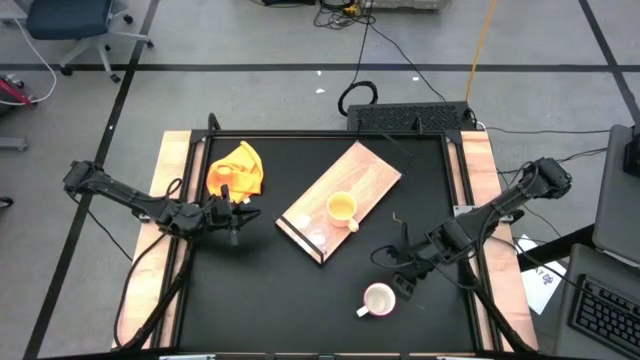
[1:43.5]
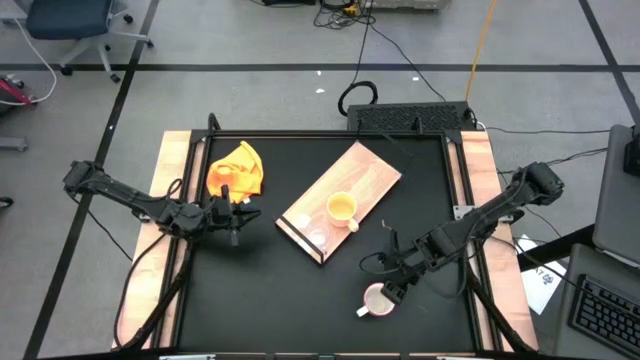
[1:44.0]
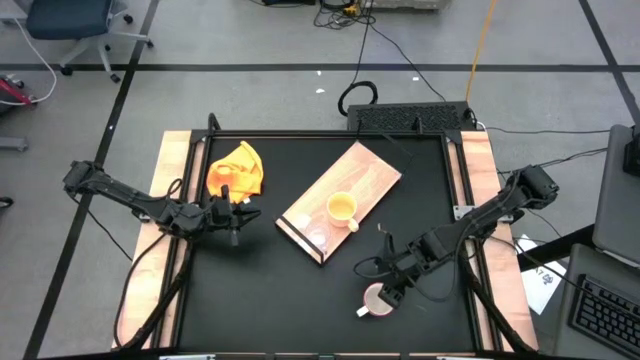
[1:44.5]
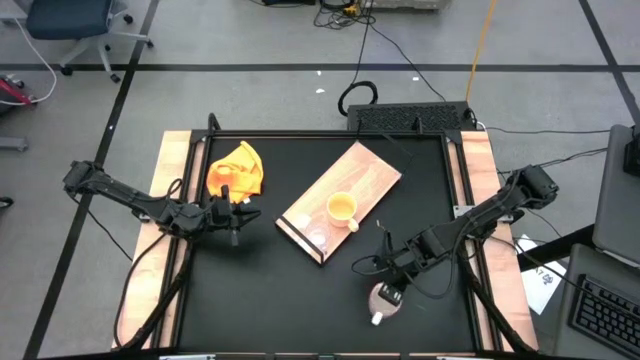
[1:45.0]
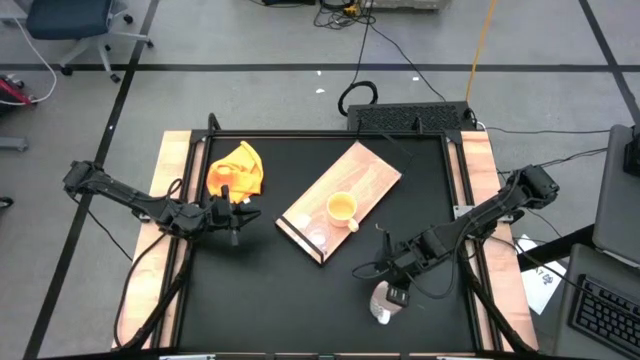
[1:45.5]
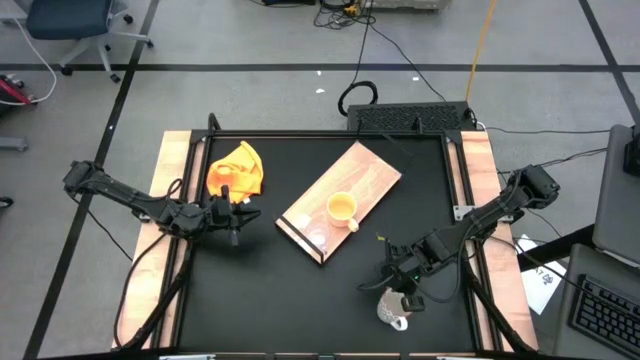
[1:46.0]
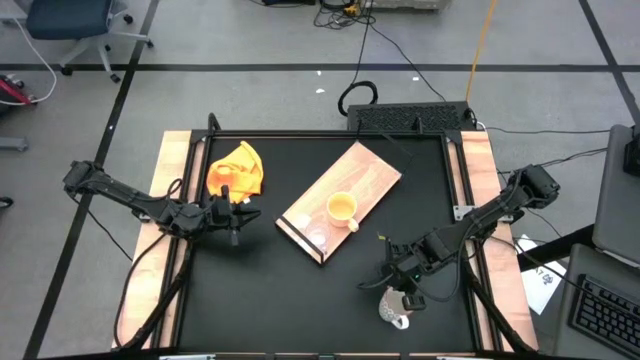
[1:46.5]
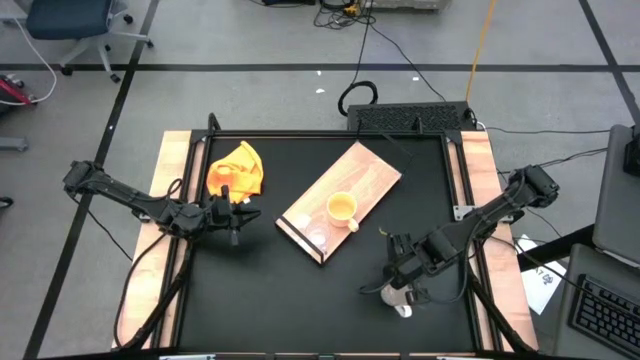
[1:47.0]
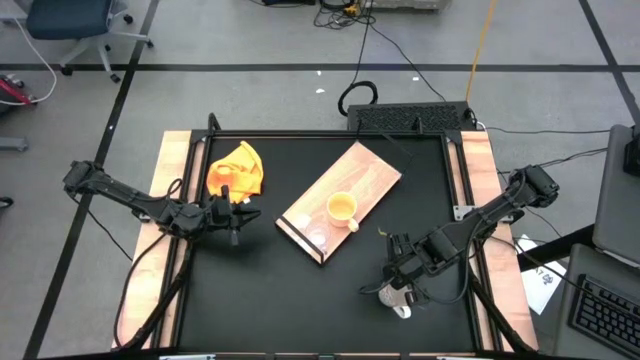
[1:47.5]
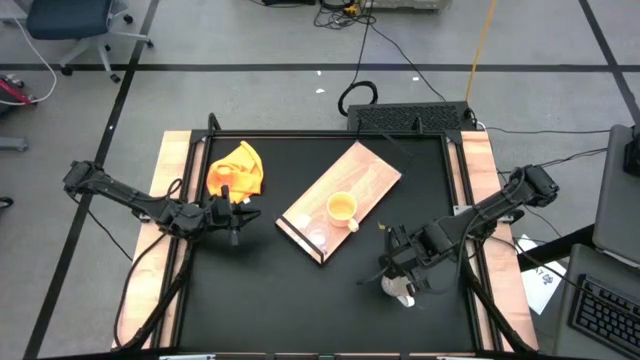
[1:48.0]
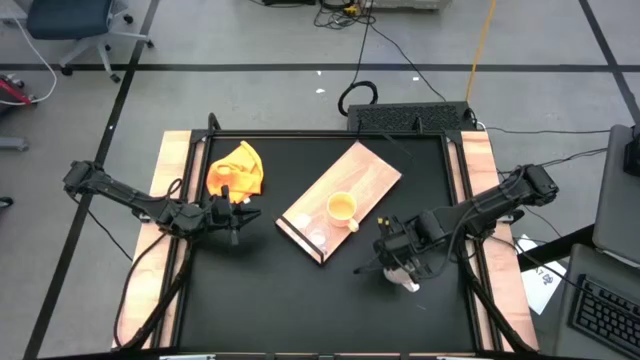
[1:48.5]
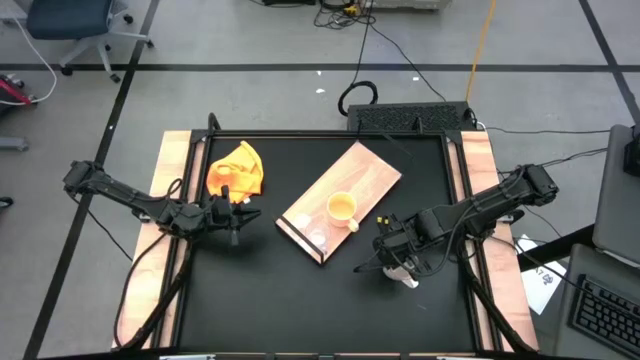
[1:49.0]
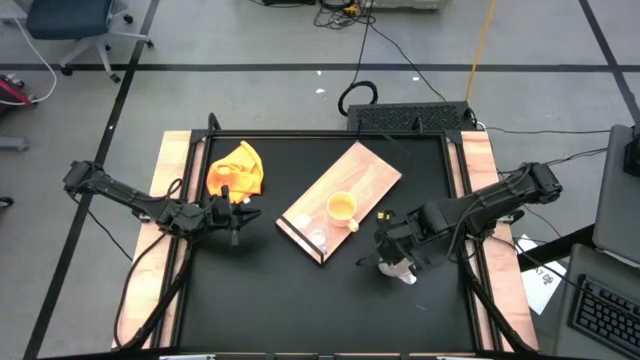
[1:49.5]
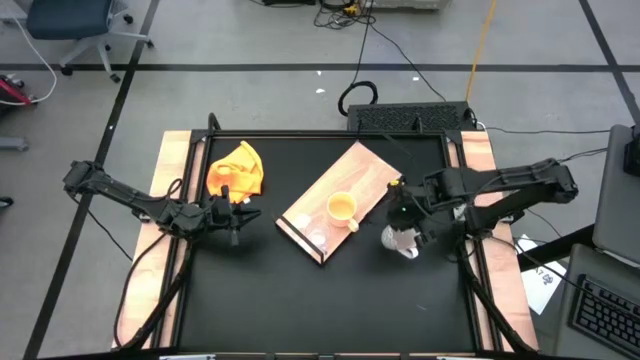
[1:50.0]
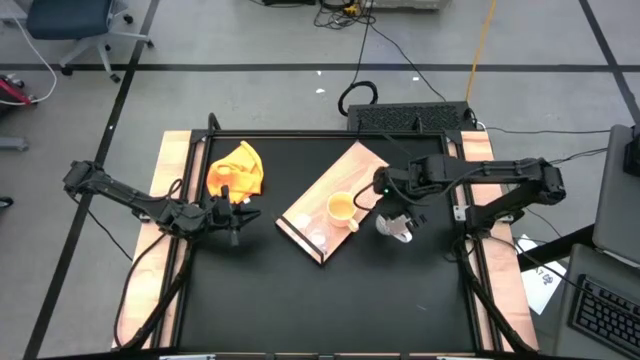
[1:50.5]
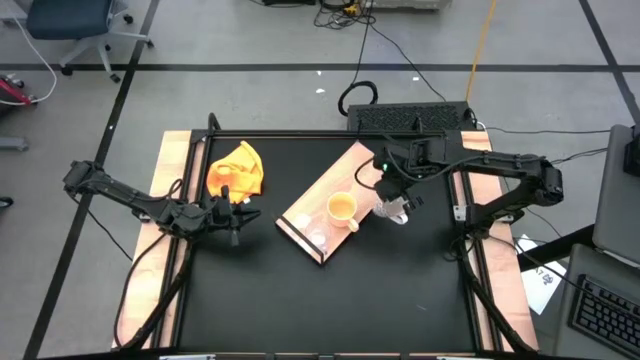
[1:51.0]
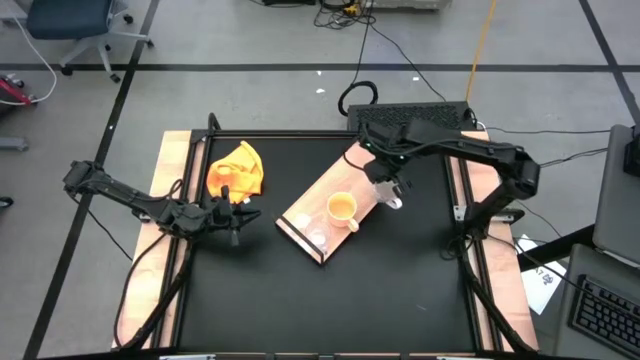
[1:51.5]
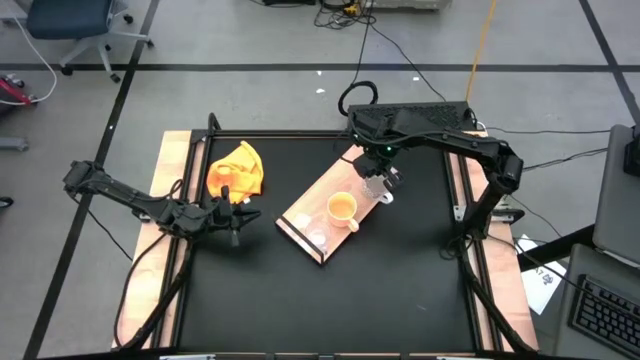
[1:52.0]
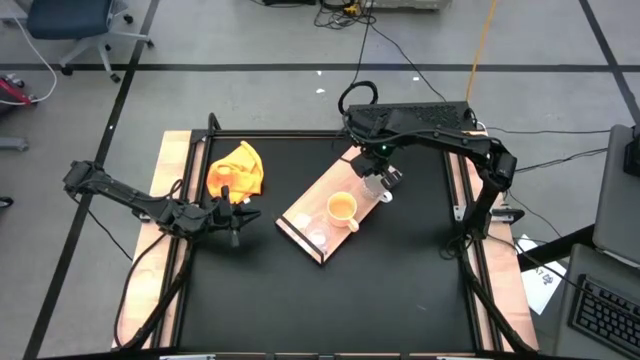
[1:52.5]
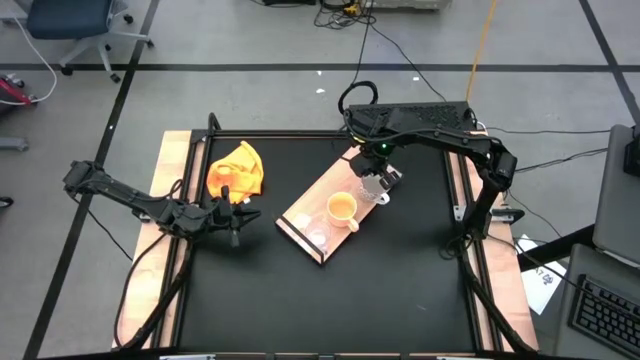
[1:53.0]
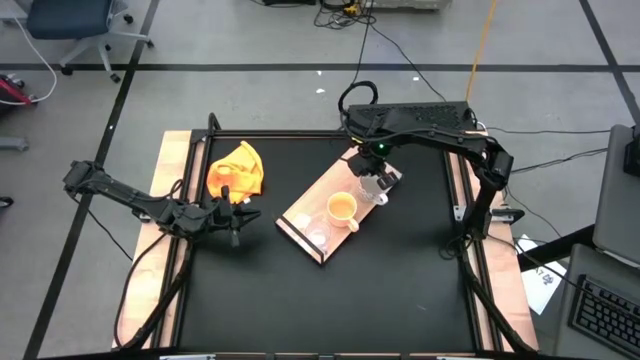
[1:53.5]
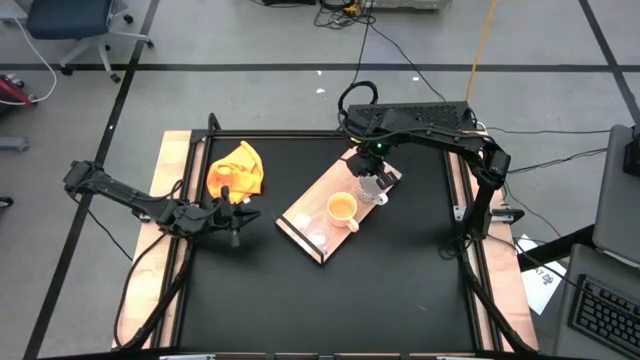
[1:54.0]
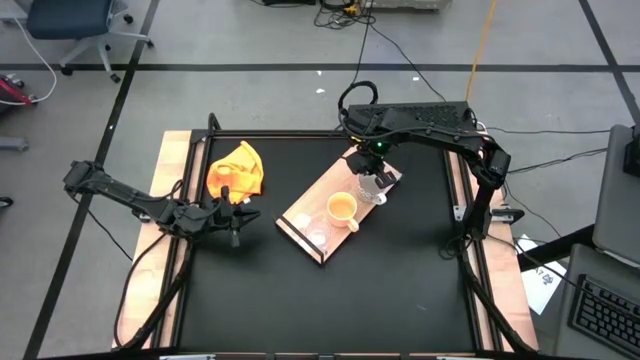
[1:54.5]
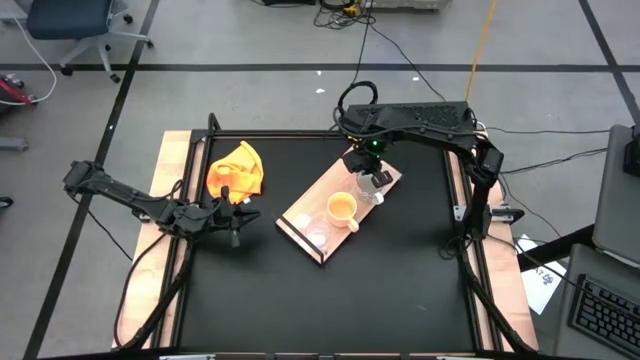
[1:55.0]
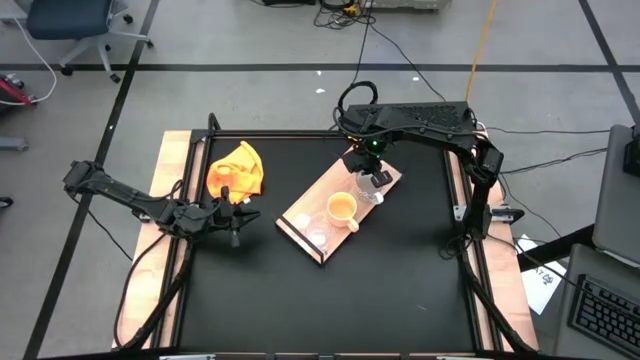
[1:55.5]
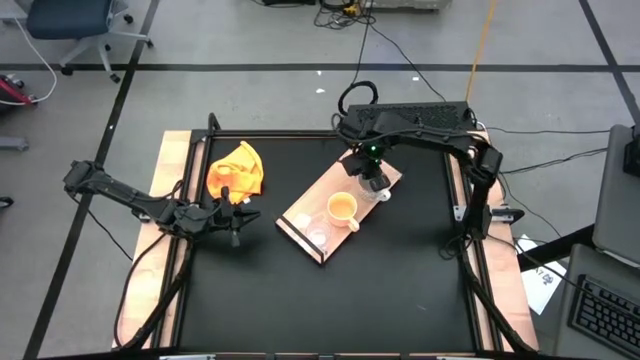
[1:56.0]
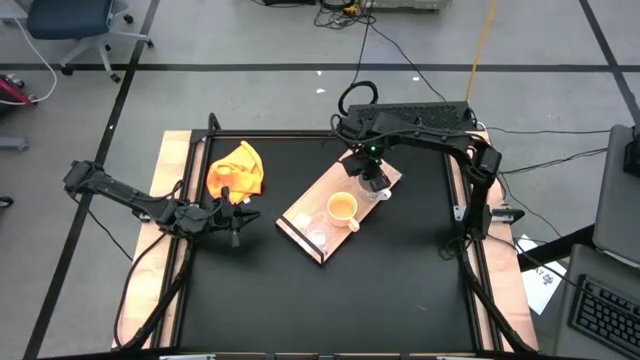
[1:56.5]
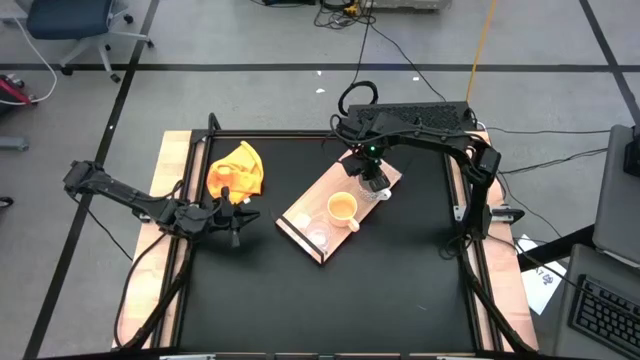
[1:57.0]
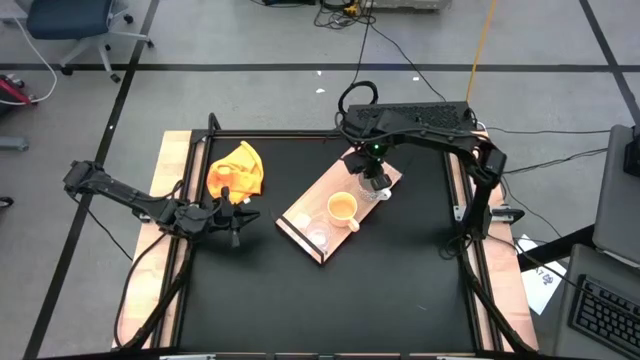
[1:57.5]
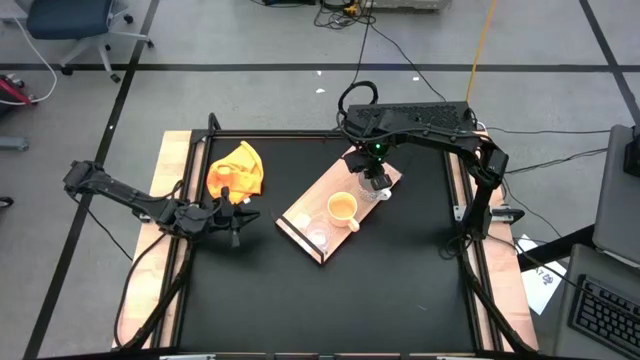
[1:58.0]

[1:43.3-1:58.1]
Task: Stack small to large cups/mugs on shelf
Put the gray mug on the shelf

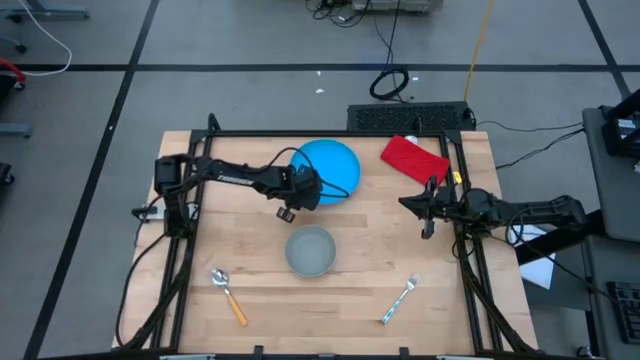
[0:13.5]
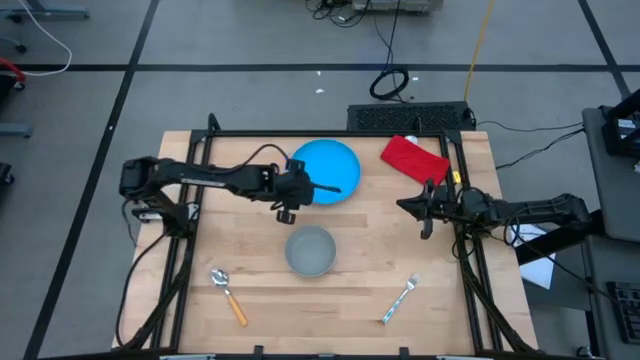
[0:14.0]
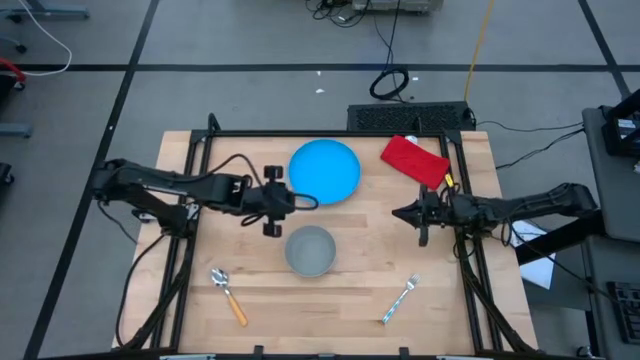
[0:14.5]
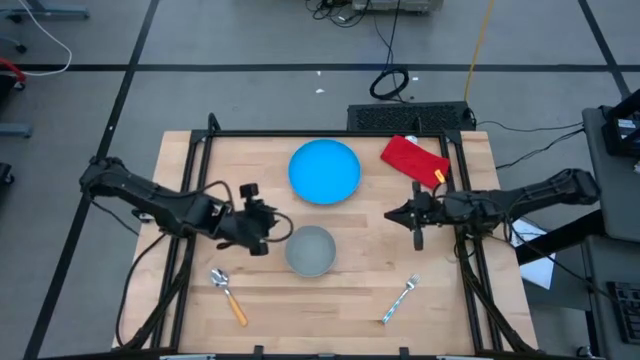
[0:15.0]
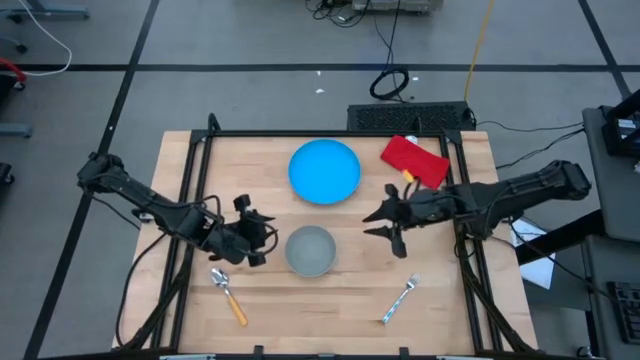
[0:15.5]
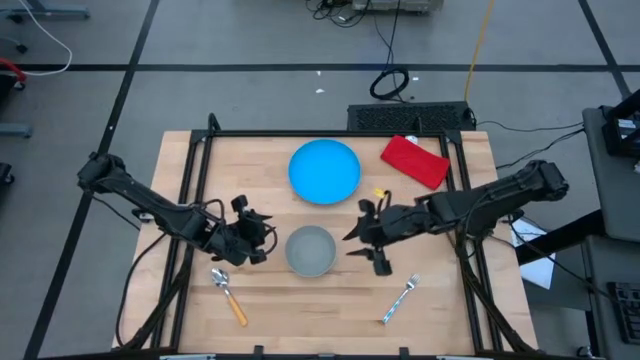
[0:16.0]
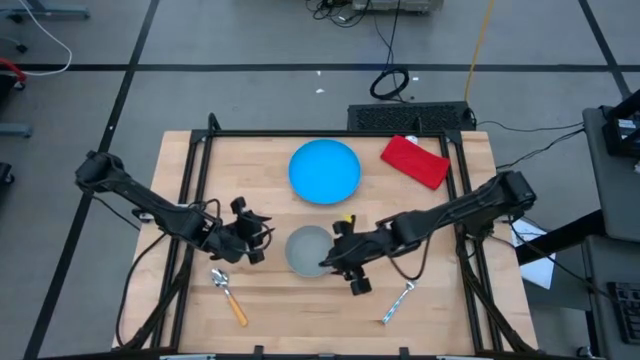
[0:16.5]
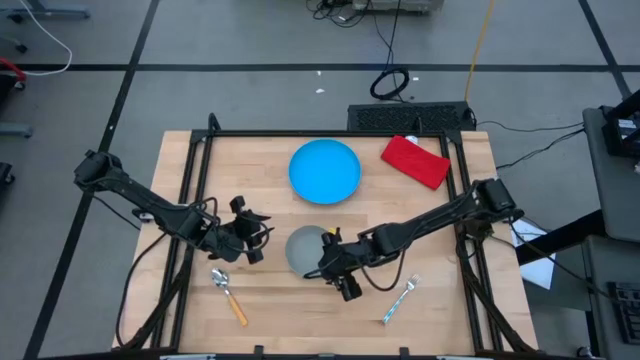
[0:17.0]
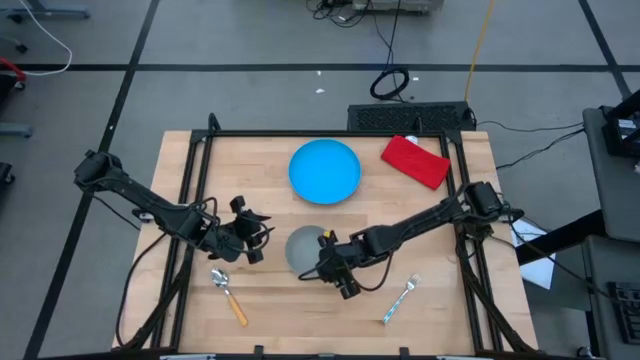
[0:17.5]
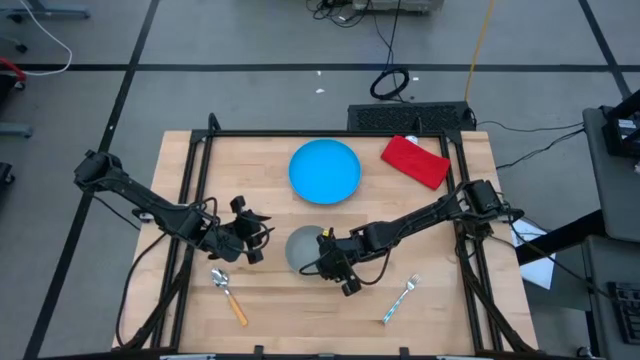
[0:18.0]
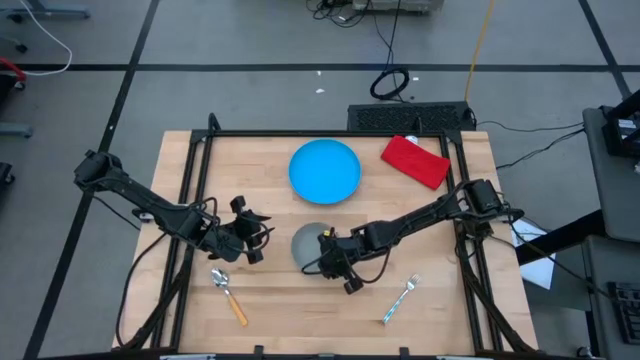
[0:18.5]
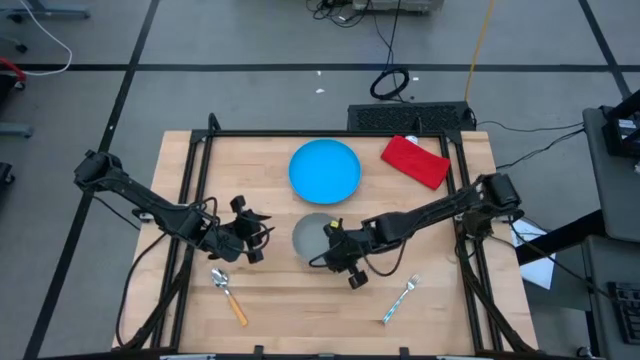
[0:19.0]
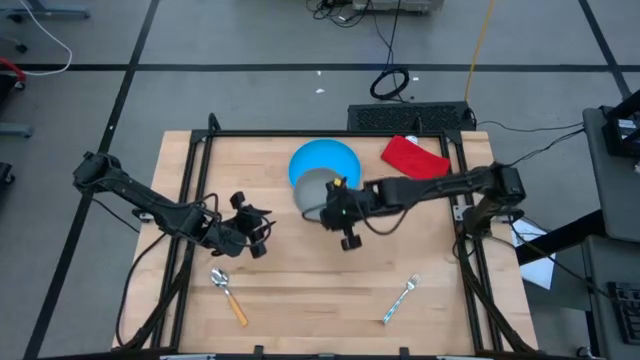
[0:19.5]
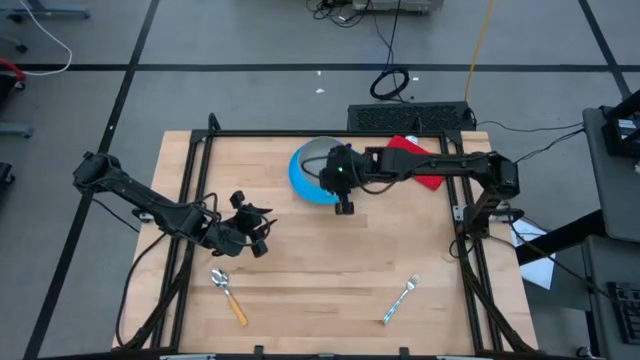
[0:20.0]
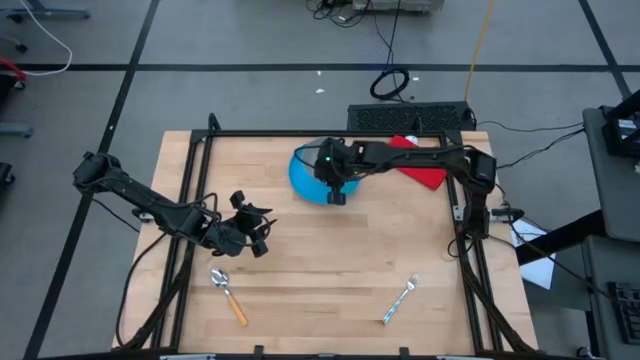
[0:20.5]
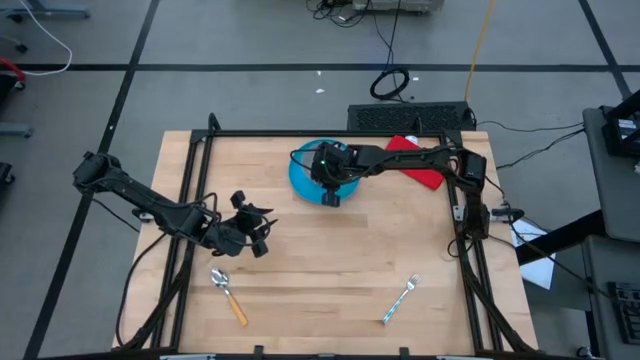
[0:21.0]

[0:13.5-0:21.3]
Task: Pick and place plate/cup/fork/spoon on tray
Put the grey bowl on top of the blue plate
